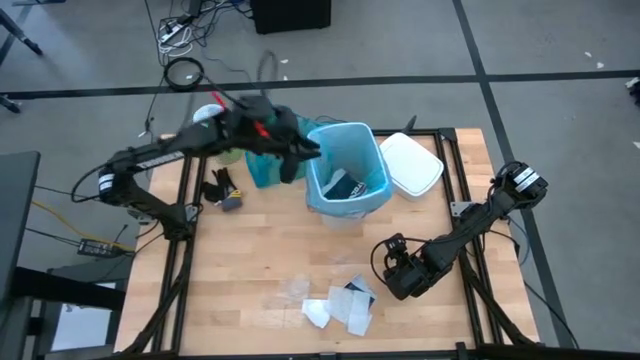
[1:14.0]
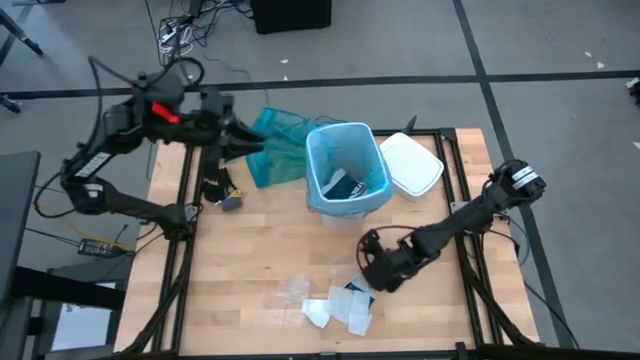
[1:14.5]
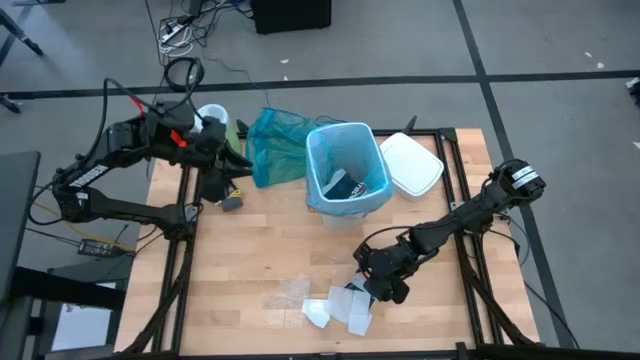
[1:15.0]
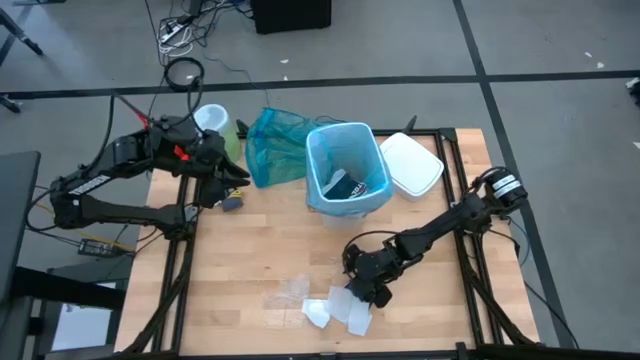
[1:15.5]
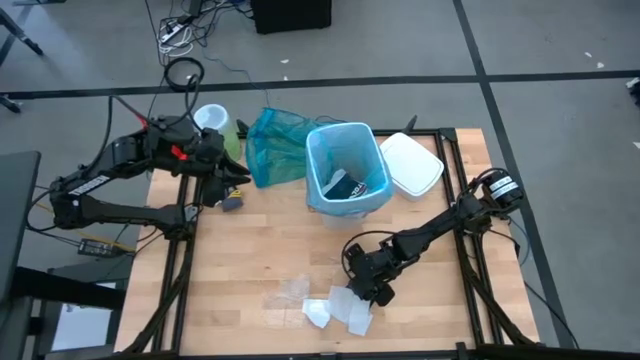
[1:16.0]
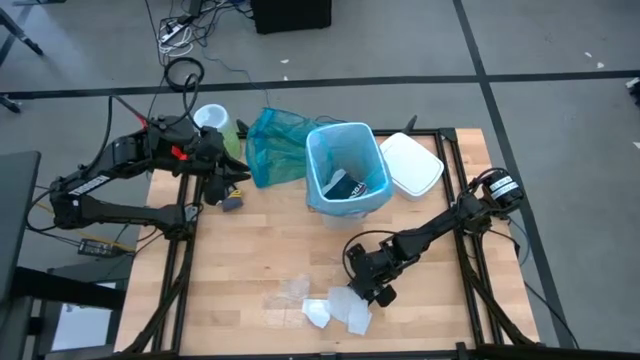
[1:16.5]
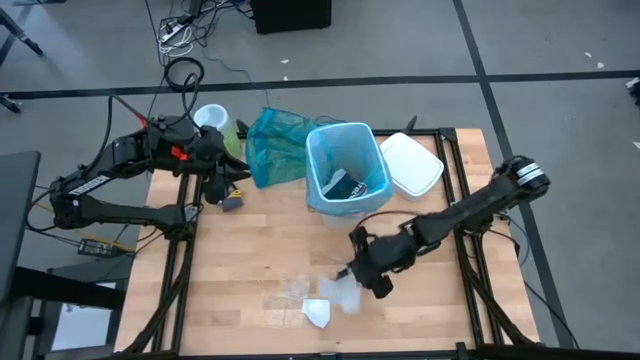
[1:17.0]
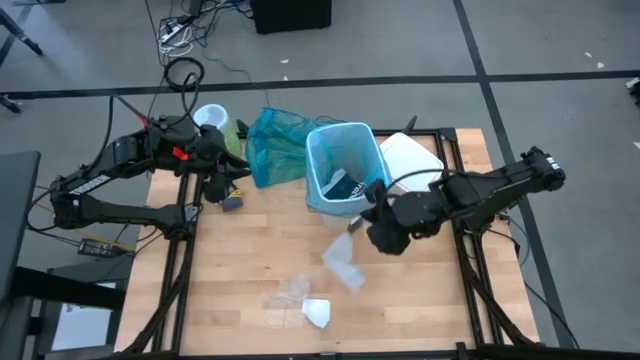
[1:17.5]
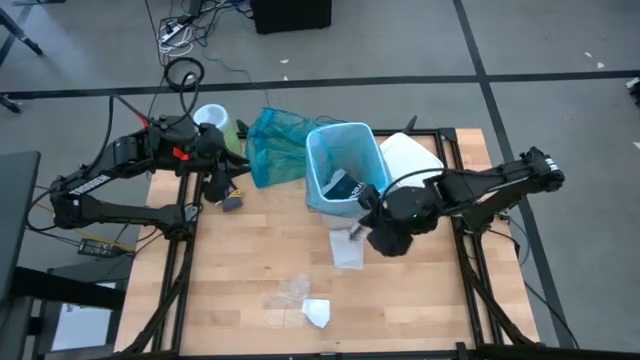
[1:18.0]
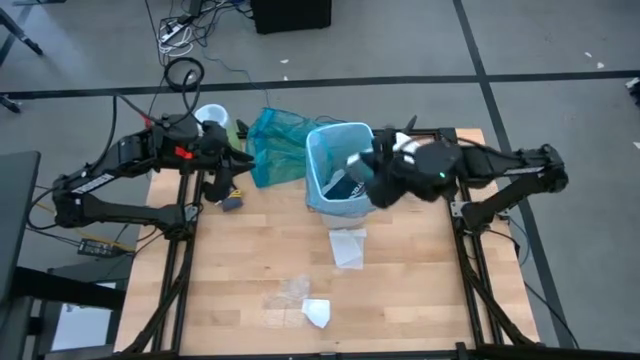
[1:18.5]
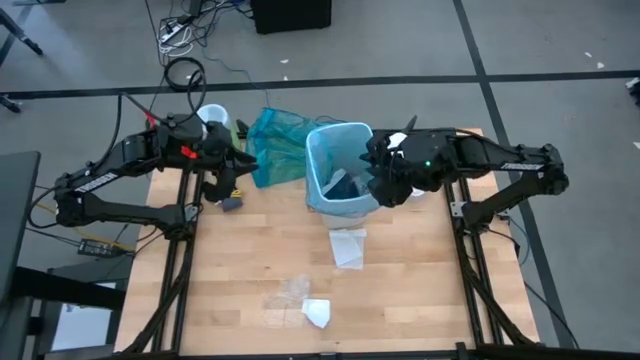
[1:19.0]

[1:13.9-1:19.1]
Task: place trash/remove bag and relplace
Put the black paper into the white trash bin

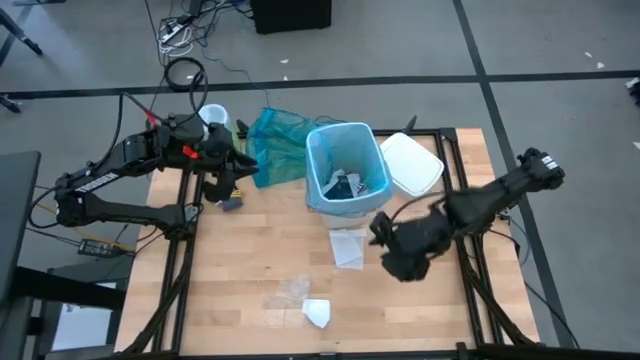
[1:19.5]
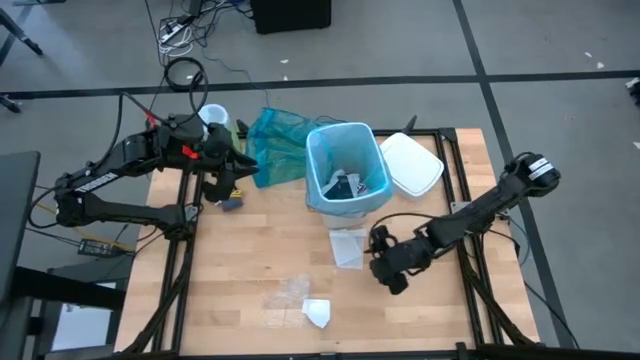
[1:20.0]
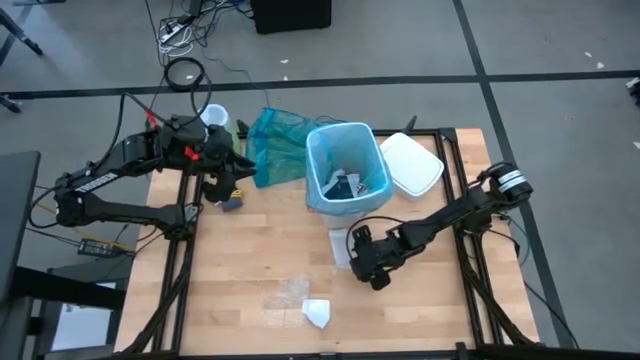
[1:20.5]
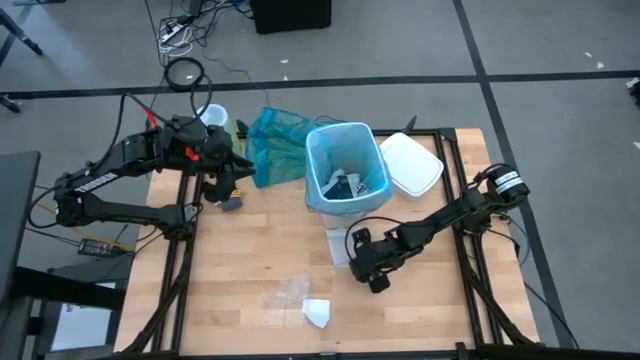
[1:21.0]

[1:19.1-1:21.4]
Put the white napkin into the white trash bin

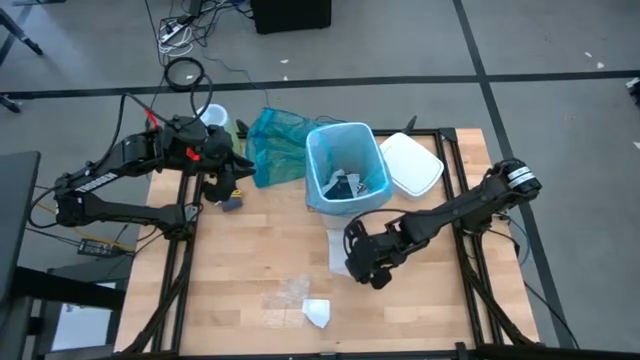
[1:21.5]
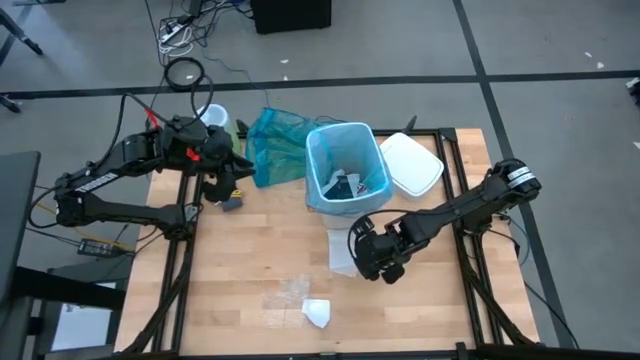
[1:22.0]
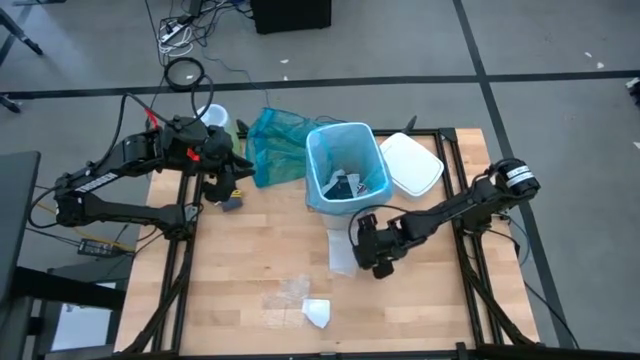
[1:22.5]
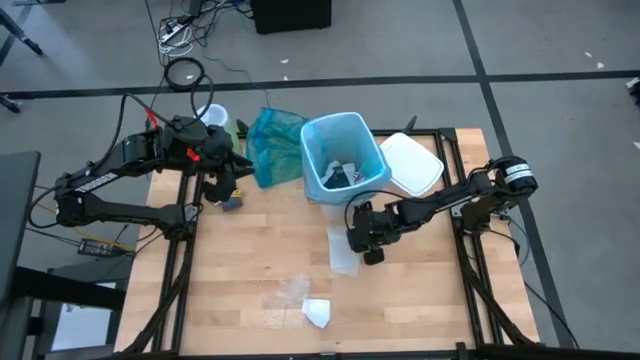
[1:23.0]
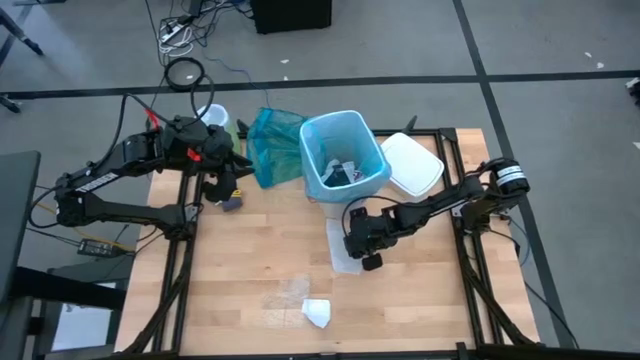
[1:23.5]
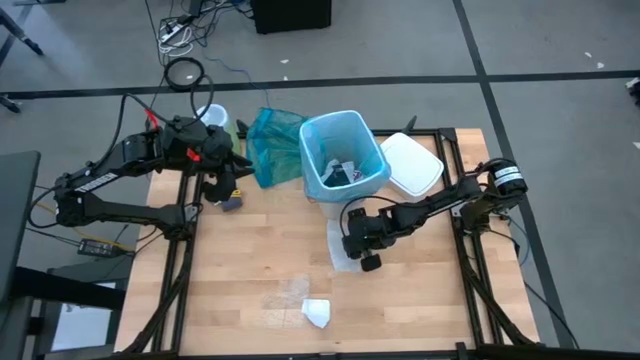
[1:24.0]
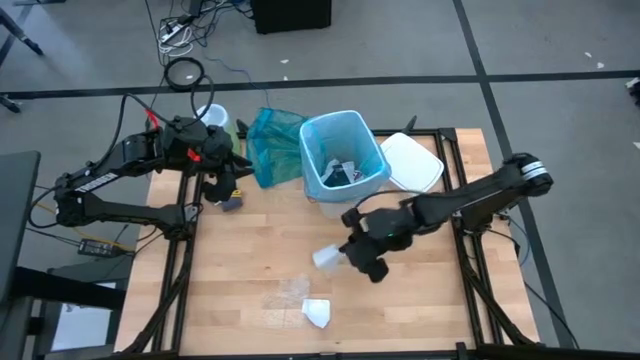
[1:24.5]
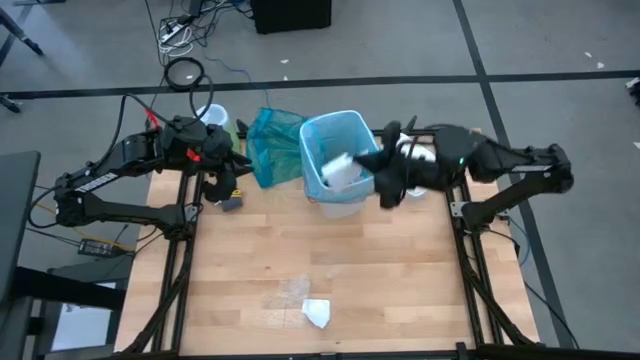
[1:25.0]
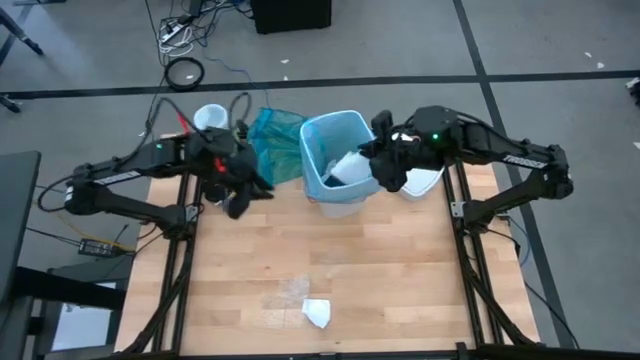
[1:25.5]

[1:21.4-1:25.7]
Put the white napkin into the white trash bin

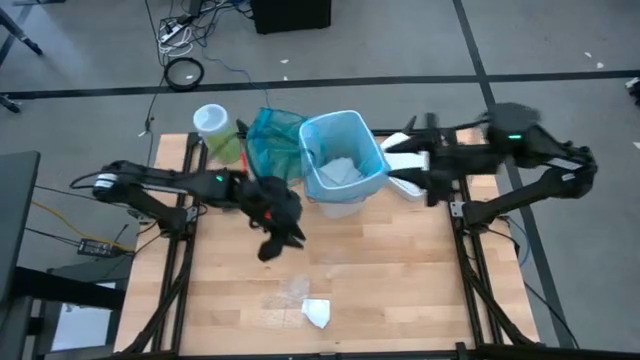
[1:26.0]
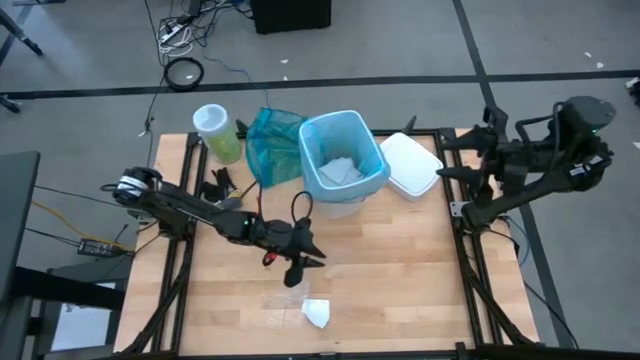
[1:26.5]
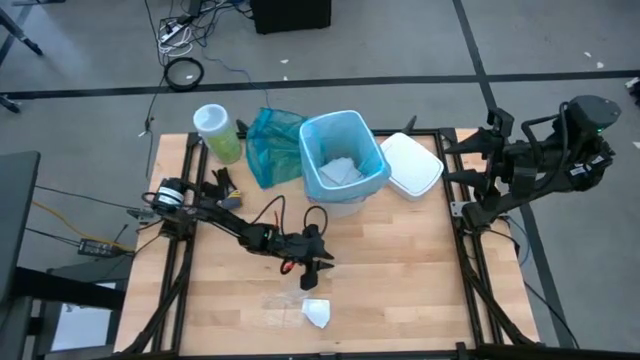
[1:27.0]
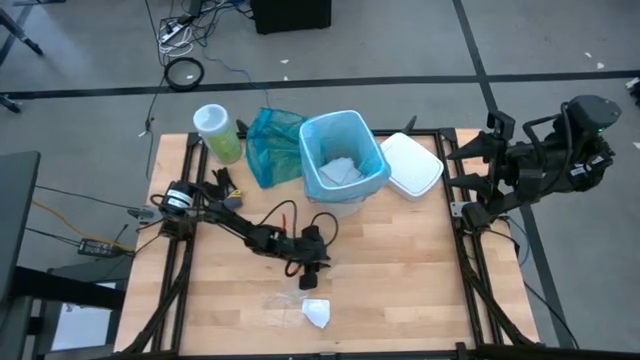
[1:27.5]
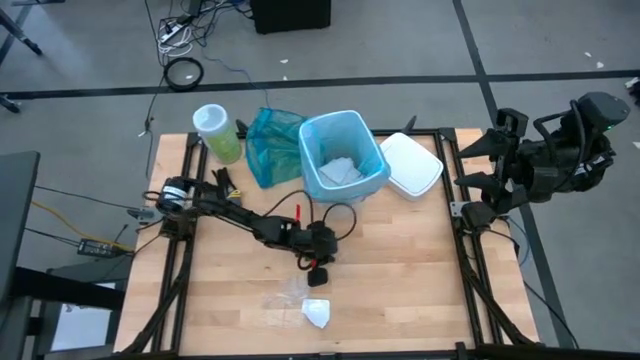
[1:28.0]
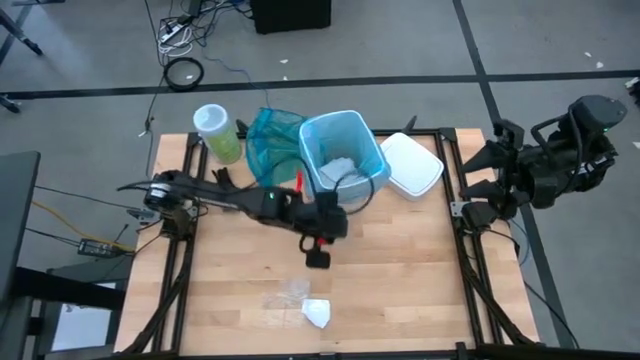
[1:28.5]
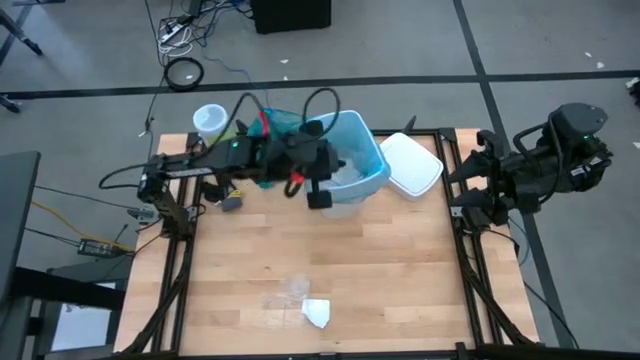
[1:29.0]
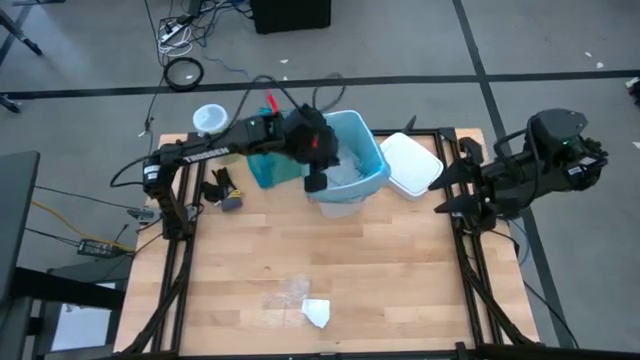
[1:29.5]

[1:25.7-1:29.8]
Put the clear plastic into the white trash bin

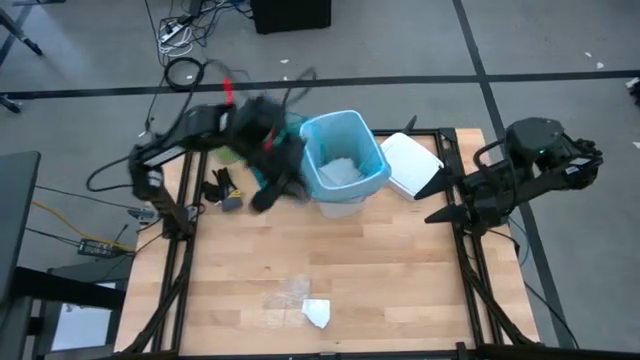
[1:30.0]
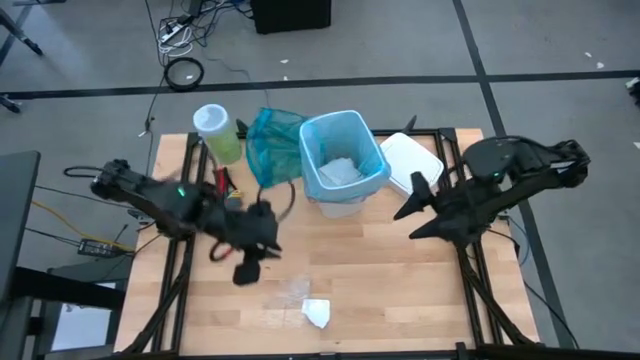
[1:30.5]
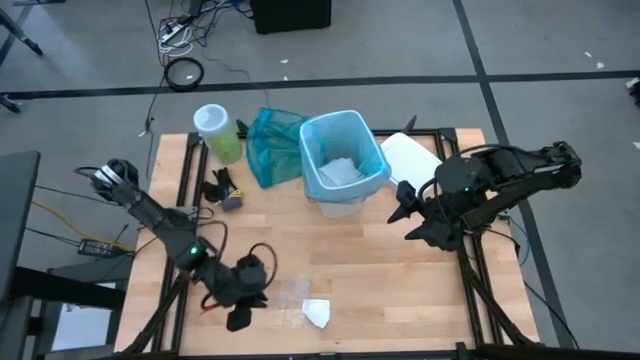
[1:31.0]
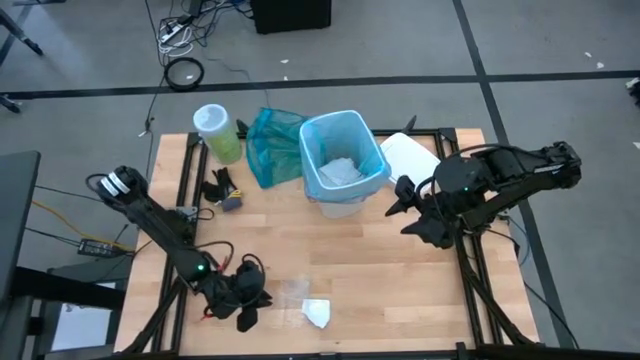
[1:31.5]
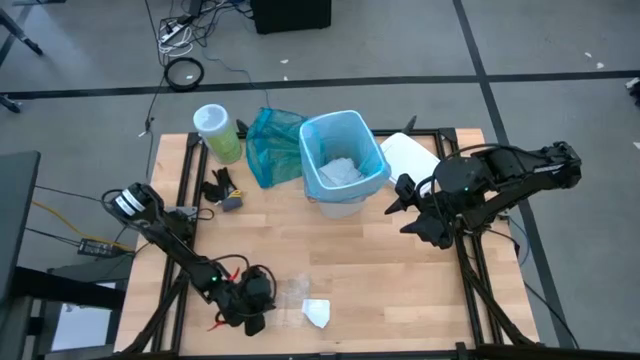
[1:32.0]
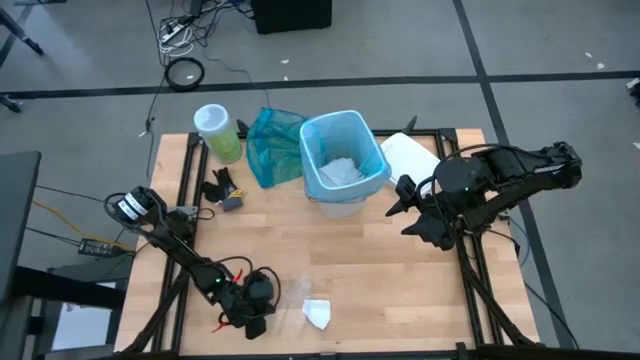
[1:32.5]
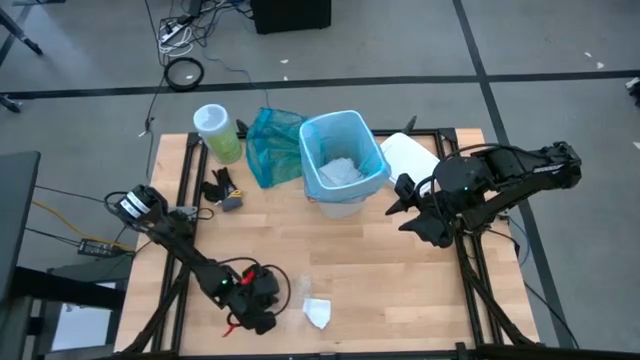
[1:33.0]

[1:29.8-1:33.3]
Put the clear plastic into the white trash bin

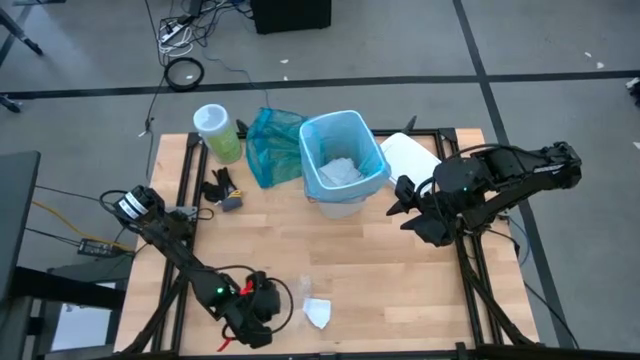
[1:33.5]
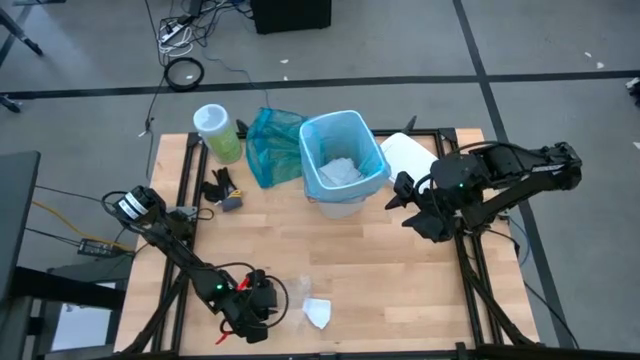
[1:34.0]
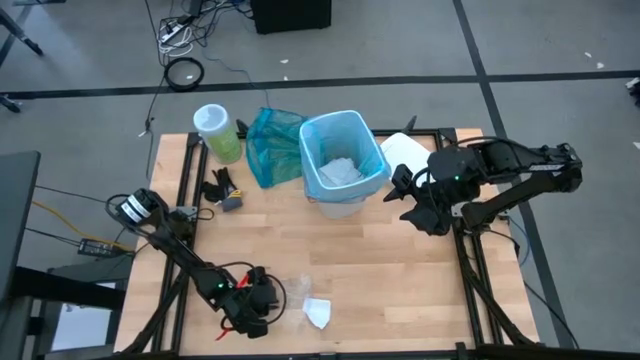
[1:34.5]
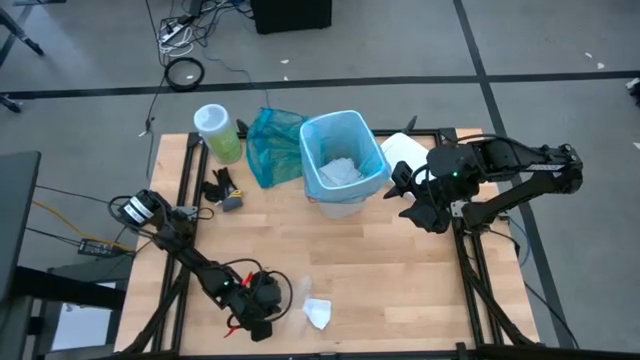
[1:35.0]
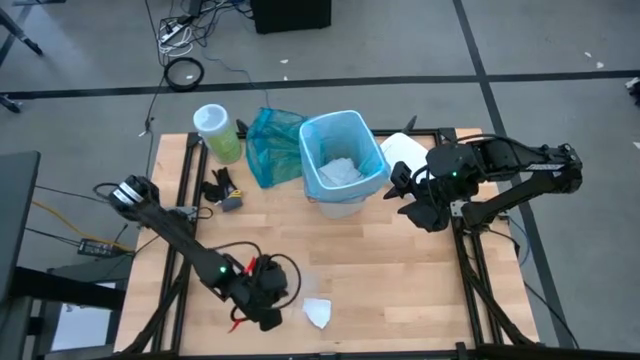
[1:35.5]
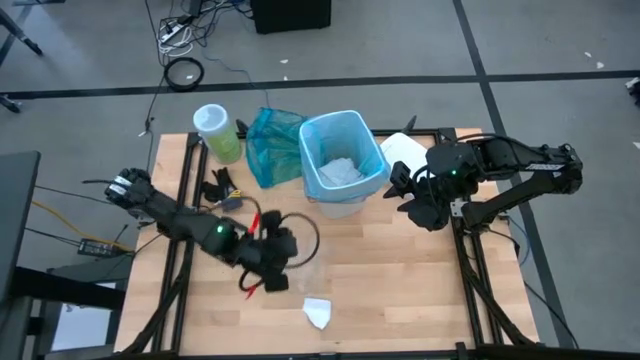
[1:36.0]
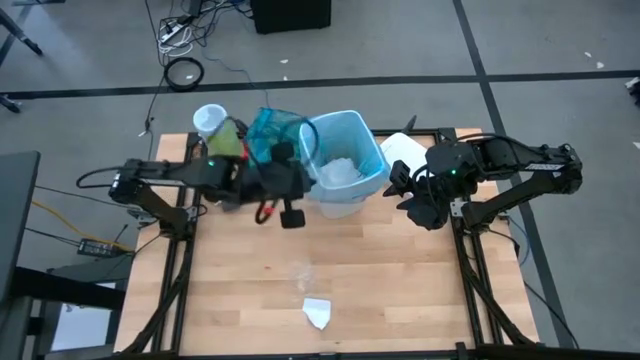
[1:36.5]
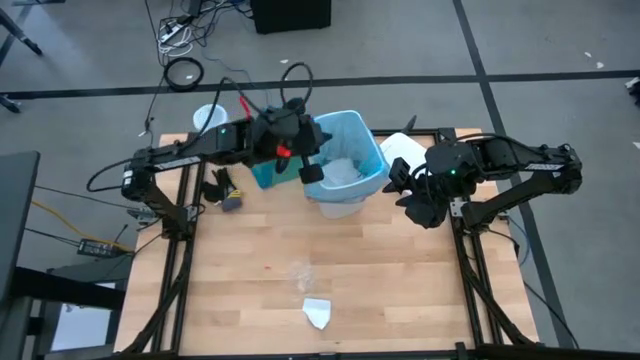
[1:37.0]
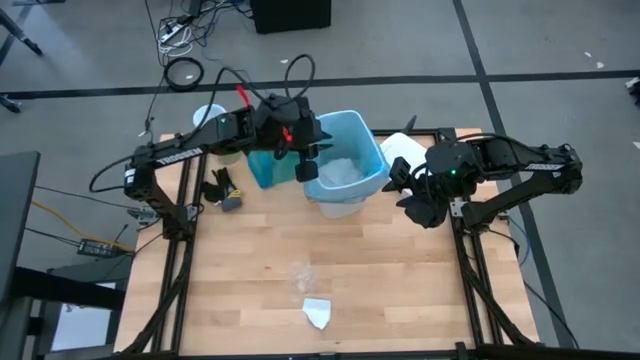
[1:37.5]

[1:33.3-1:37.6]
Put the clear plastic into the white trash bin
